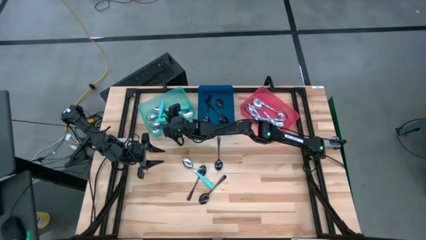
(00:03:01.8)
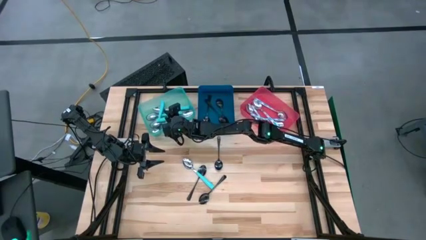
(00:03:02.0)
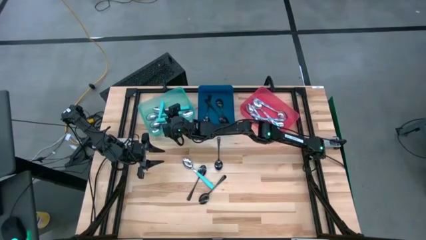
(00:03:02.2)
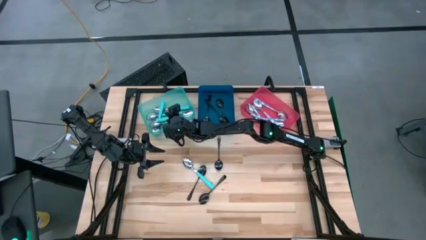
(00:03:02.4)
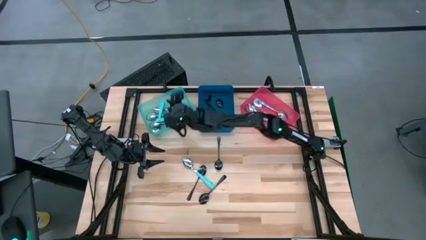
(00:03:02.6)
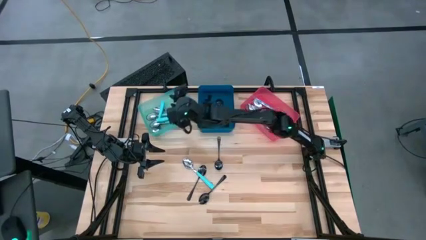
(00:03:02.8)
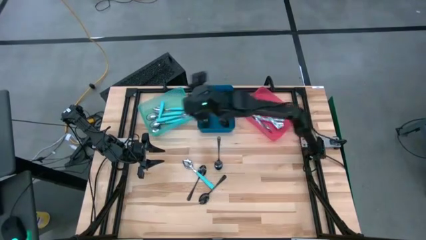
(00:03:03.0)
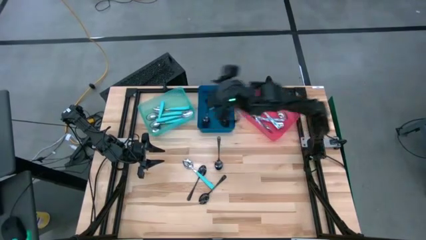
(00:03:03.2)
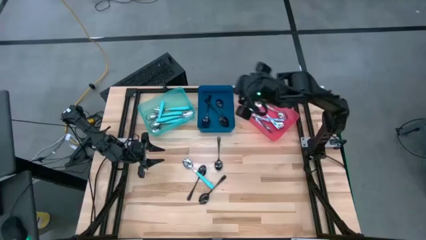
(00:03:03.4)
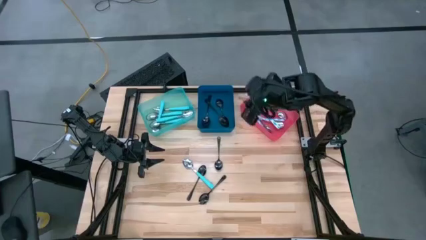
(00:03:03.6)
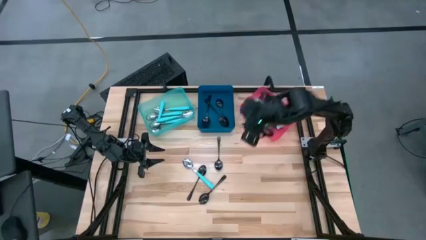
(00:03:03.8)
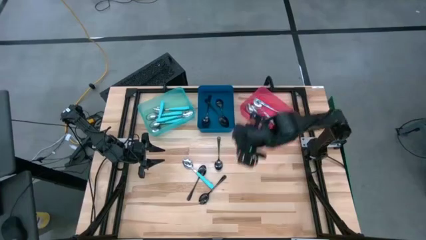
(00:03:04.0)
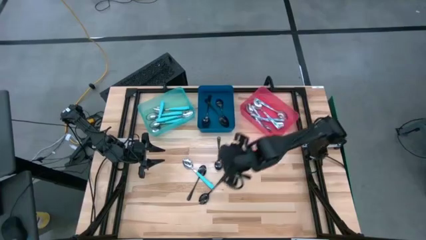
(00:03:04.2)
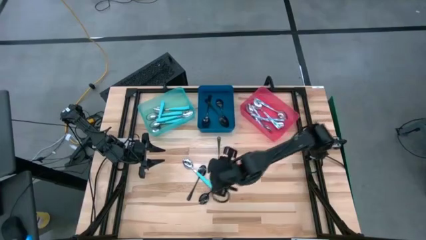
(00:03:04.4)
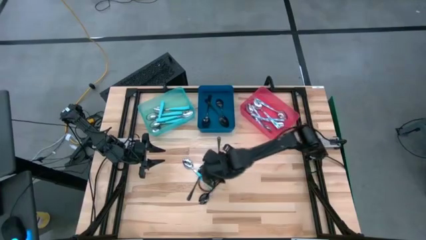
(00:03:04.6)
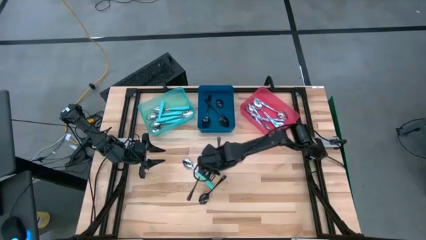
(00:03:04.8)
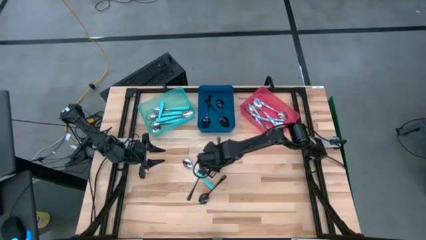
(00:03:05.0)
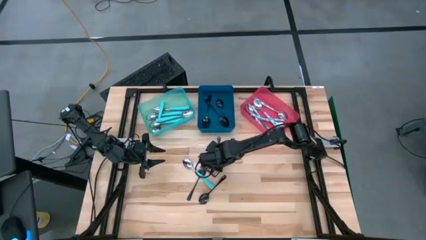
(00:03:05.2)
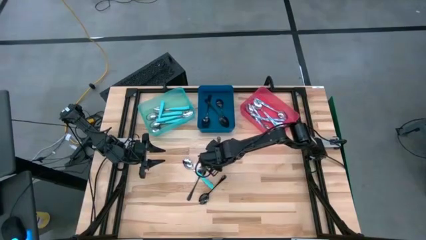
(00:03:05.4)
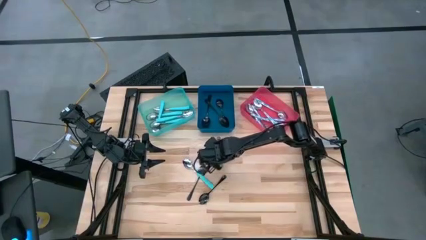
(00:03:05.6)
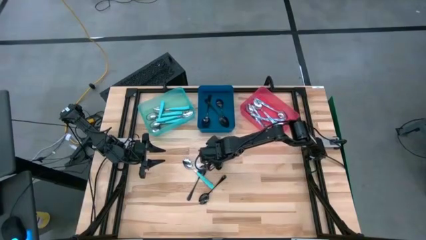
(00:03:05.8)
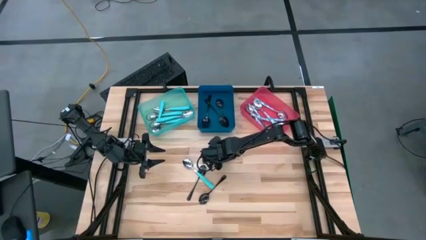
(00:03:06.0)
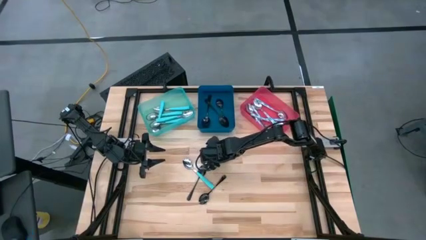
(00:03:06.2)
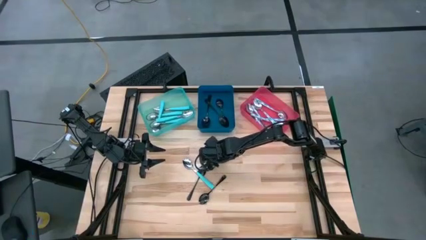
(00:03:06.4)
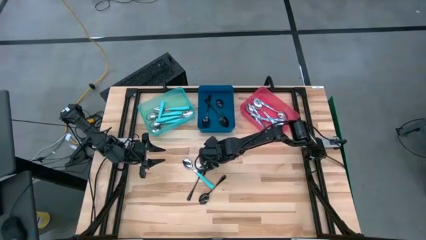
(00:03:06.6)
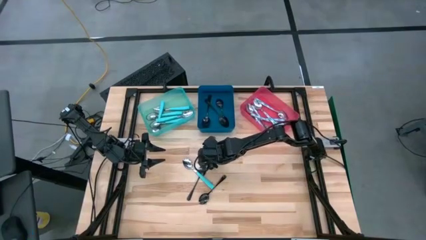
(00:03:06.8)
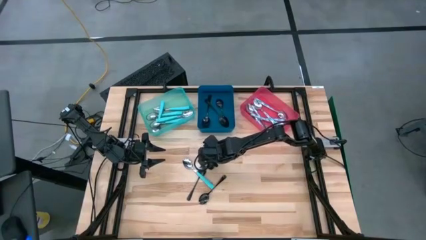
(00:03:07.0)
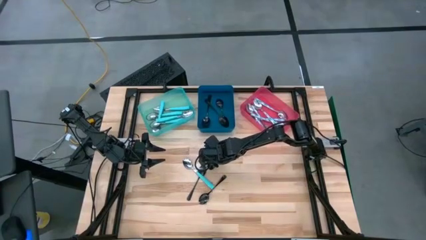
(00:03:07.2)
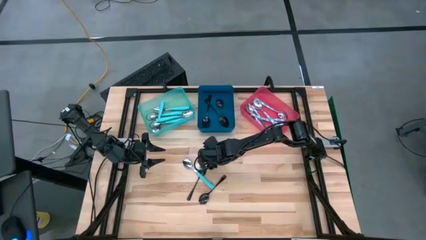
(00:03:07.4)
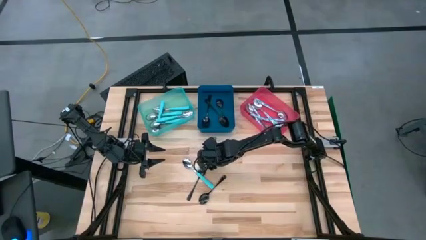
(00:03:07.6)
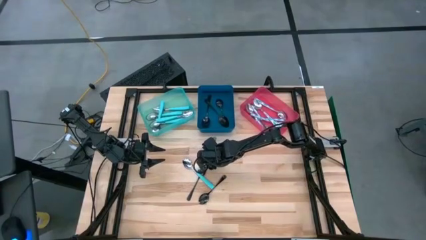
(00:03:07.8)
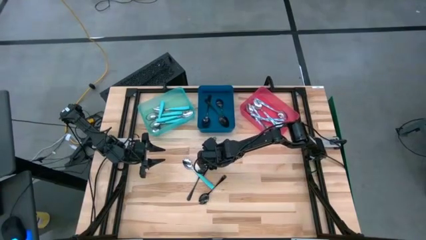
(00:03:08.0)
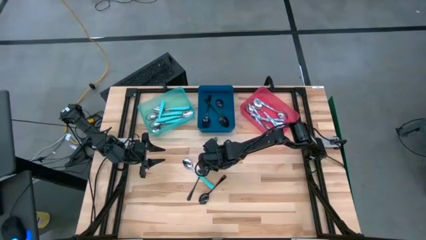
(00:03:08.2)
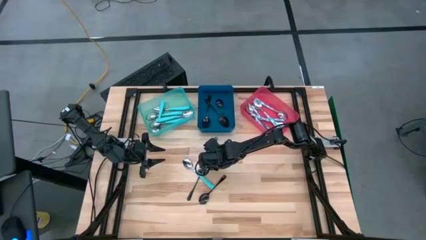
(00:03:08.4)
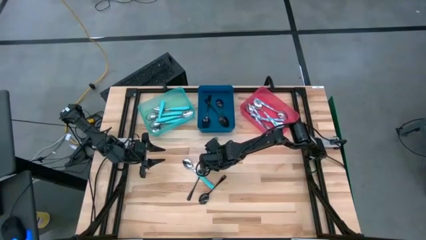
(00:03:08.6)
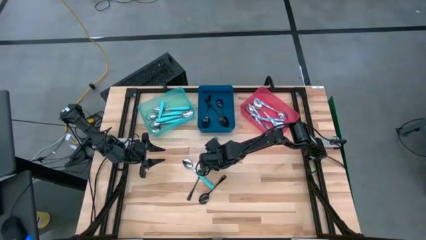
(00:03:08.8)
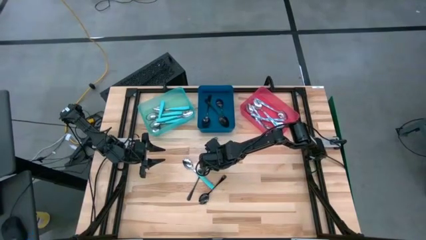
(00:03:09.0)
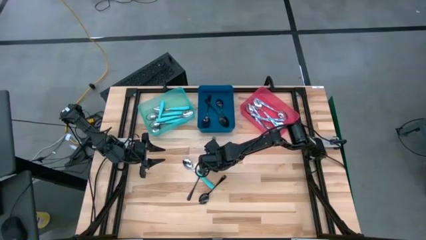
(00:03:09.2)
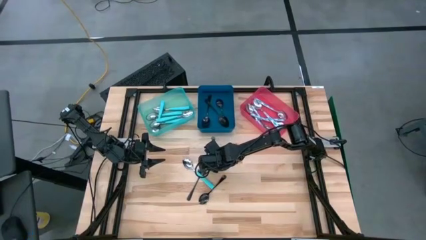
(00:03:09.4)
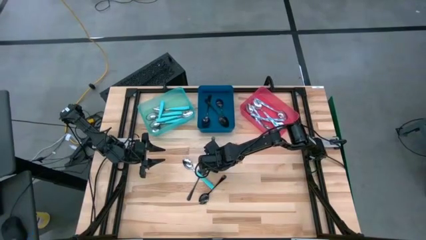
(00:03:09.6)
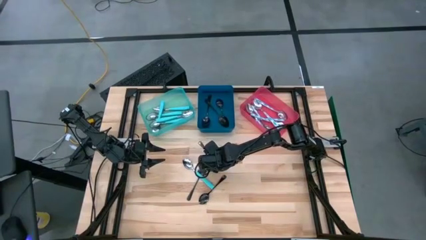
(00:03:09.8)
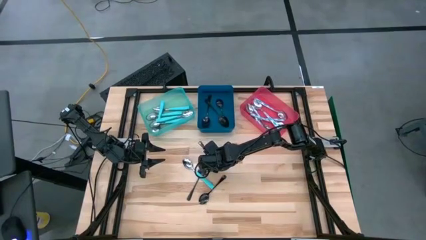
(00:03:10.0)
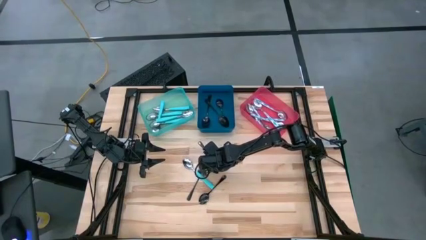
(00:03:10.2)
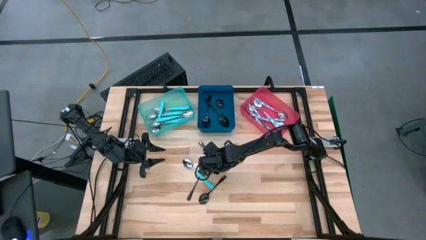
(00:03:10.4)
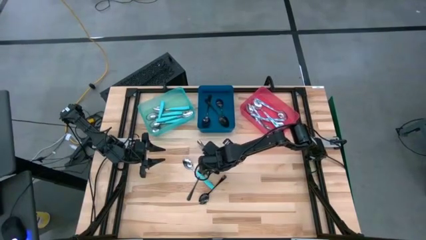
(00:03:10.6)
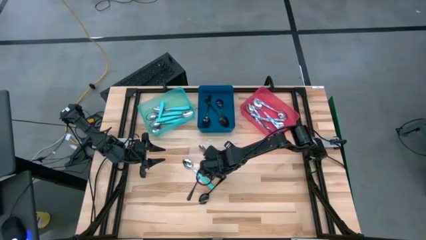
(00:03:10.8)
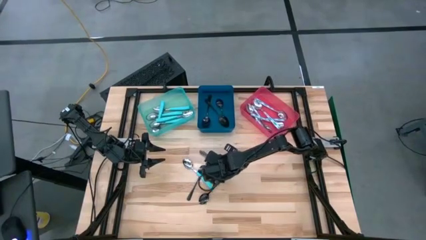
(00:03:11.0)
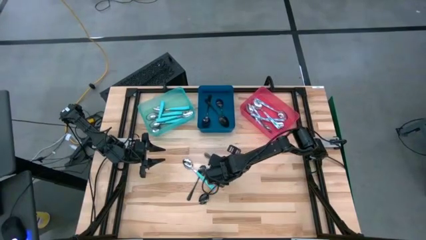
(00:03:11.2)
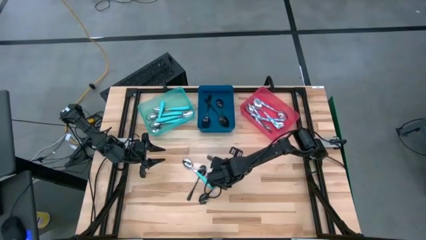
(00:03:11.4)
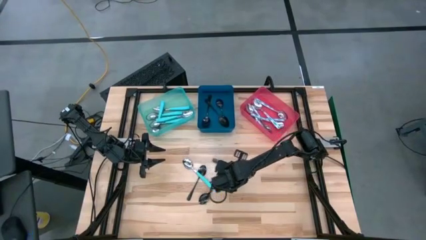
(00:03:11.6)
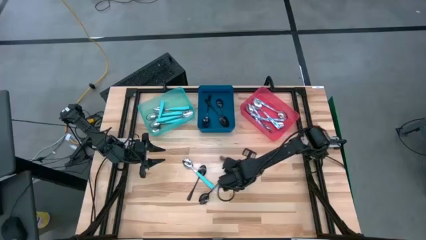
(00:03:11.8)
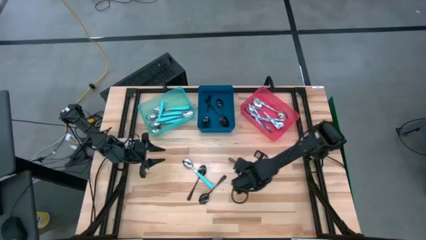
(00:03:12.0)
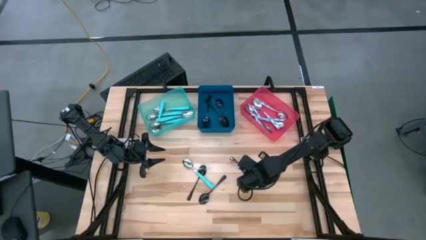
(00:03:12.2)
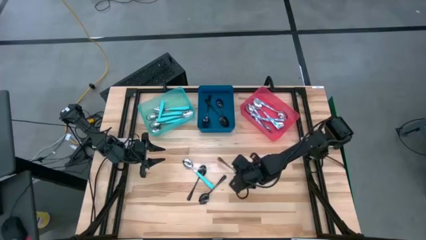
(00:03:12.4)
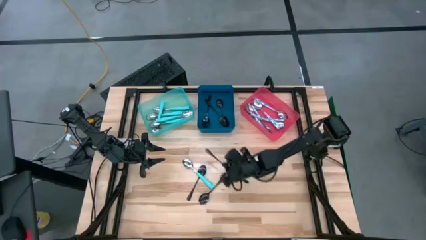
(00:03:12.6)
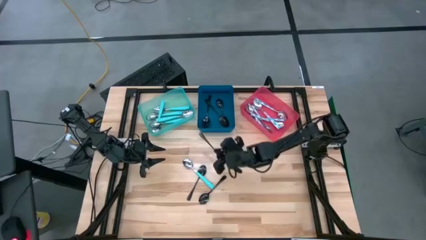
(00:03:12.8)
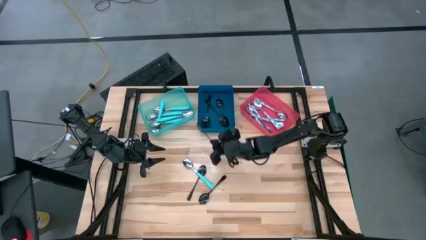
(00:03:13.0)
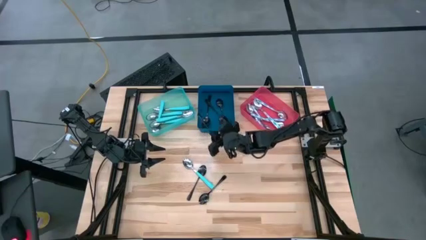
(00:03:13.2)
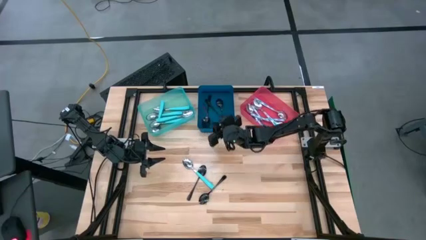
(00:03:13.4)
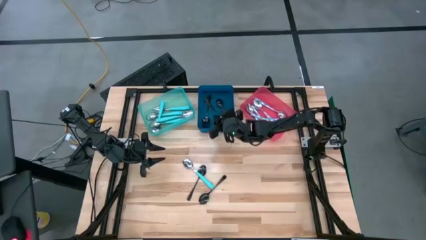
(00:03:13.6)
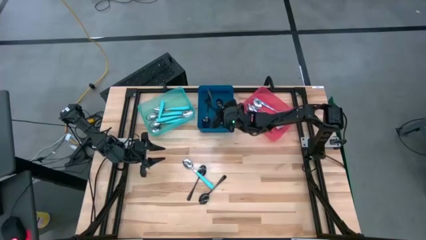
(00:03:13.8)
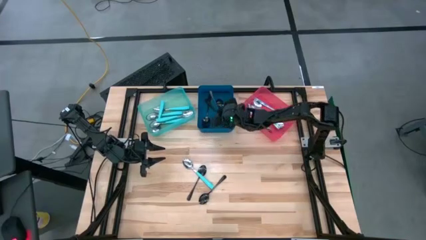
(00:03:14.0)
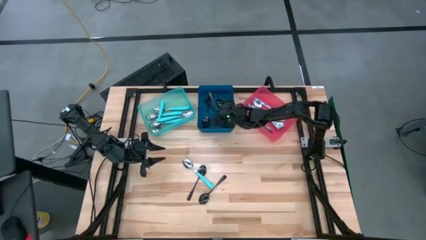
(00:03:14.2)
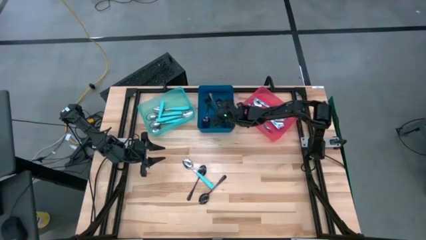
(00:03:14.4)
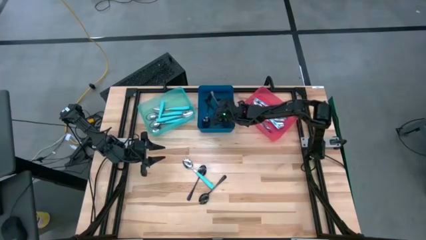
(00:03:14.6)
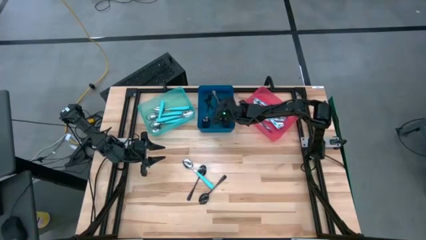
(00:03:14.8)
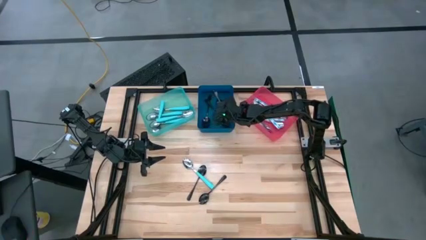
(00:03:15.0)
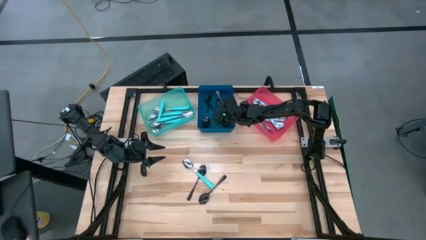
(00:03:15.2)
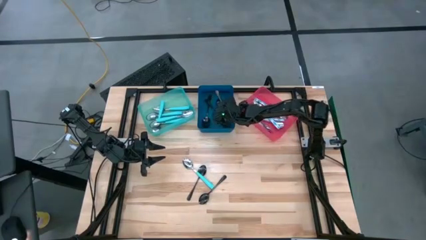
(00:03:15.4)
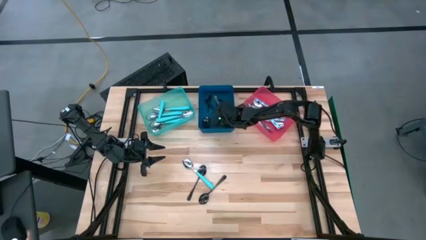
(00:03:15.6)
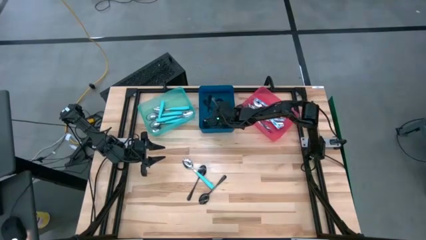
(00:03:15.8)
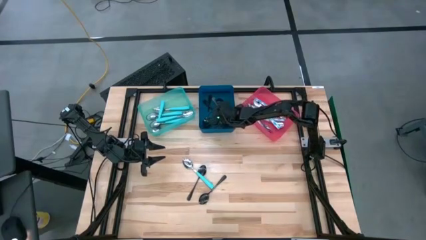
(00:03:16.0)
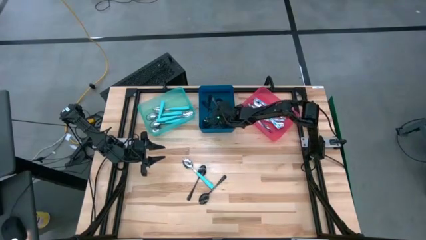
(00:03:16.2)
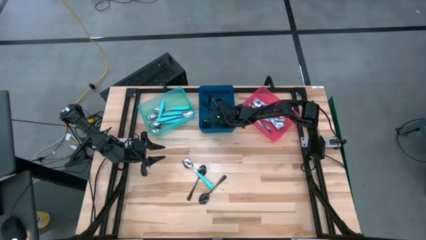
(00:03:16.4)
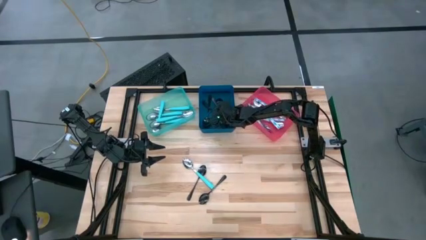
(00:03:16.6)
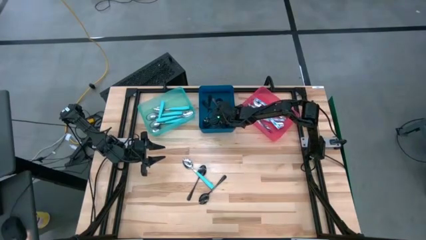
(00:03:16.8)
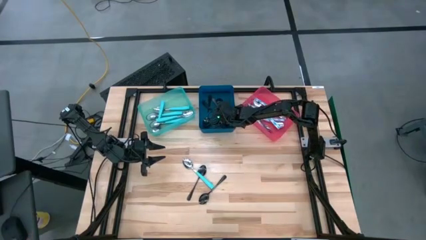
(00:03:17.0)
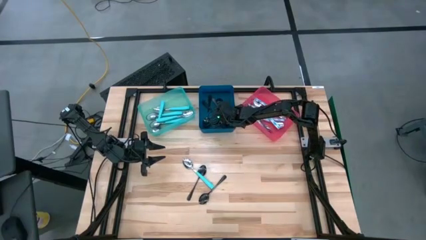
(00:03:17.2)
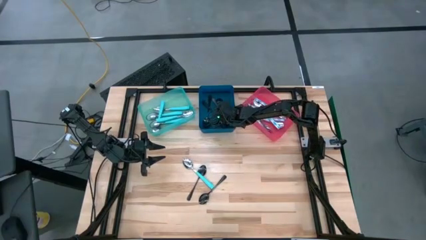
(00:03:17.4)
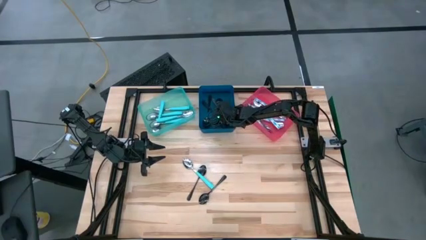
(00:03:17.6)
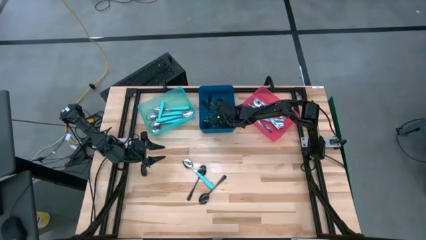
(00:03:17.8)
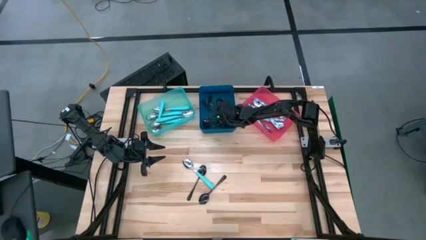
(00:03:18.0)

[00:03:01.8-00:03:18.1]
Task: Sort silverware by color (type)
Put the black spoon into the blue bin
